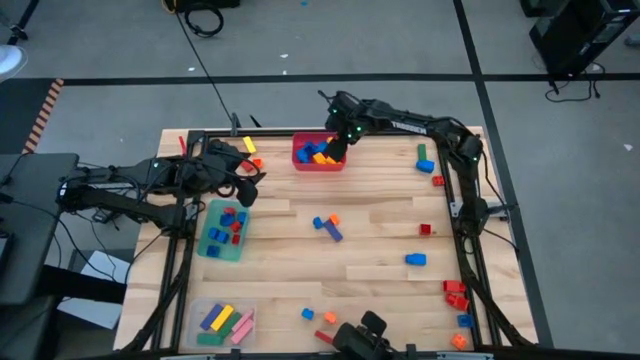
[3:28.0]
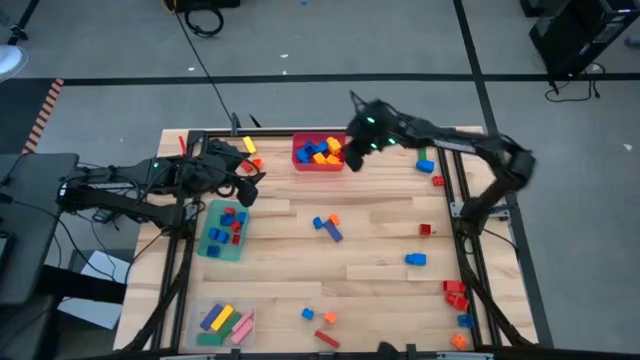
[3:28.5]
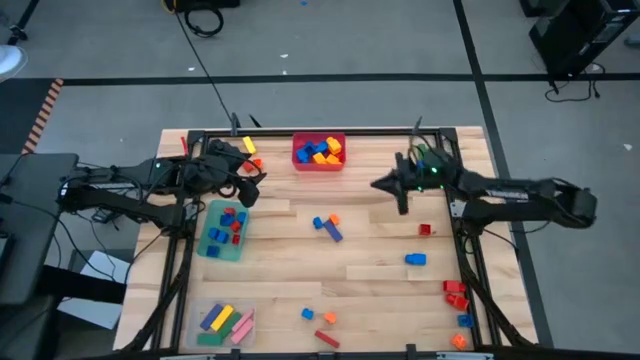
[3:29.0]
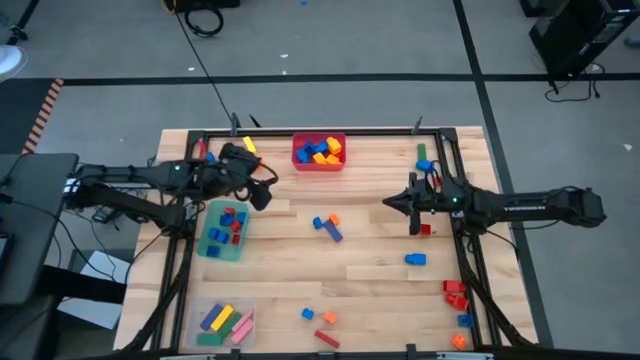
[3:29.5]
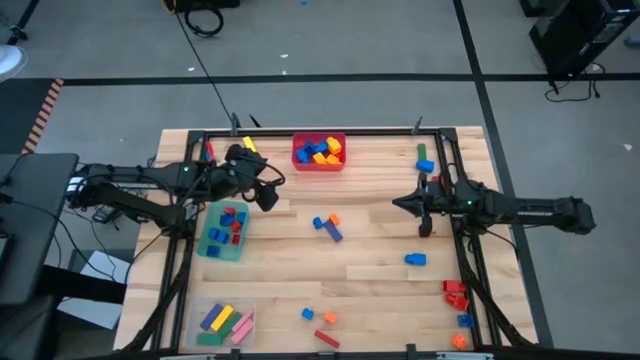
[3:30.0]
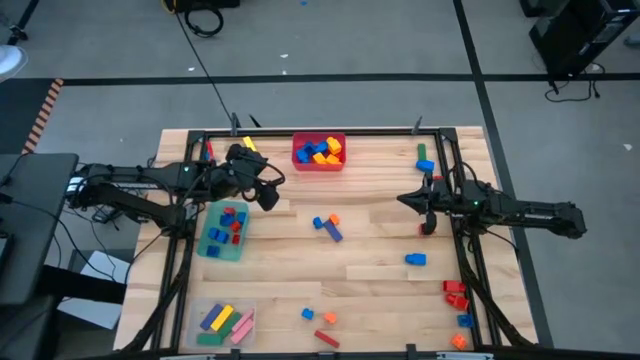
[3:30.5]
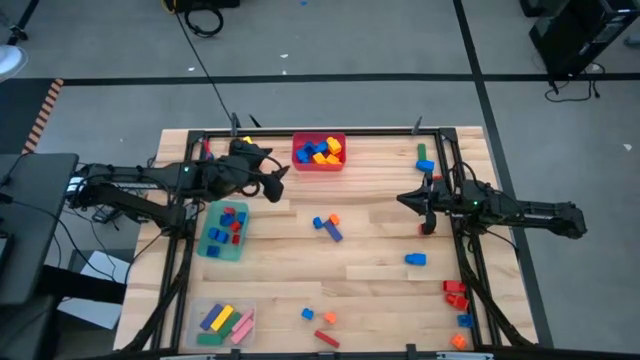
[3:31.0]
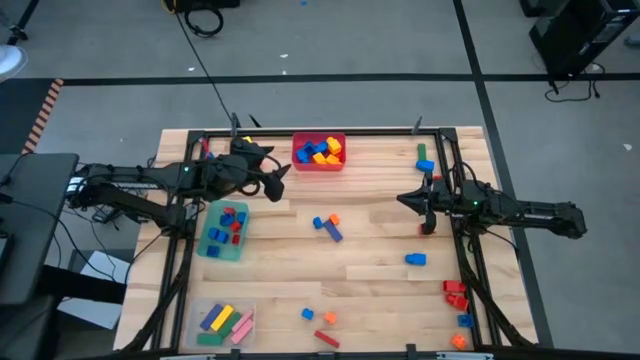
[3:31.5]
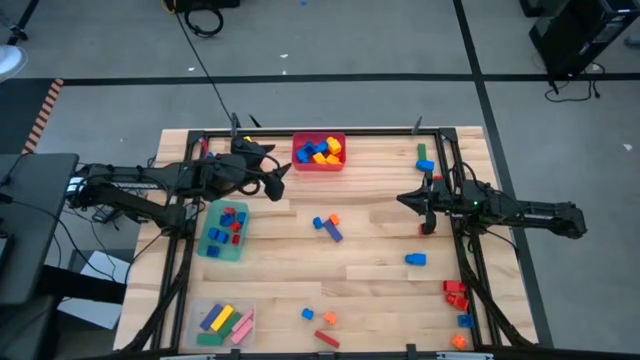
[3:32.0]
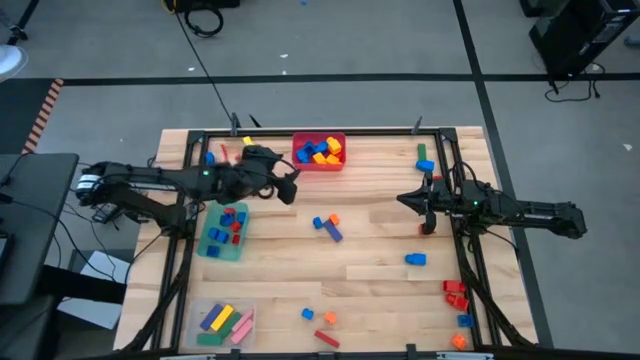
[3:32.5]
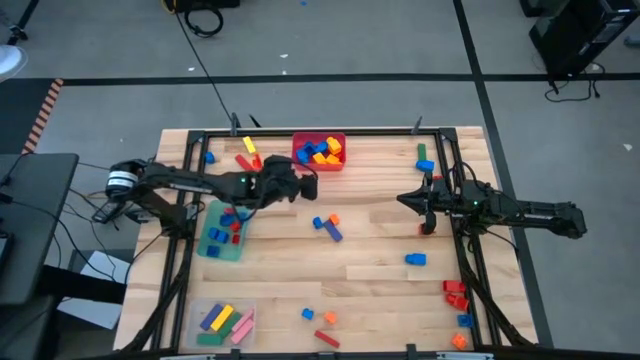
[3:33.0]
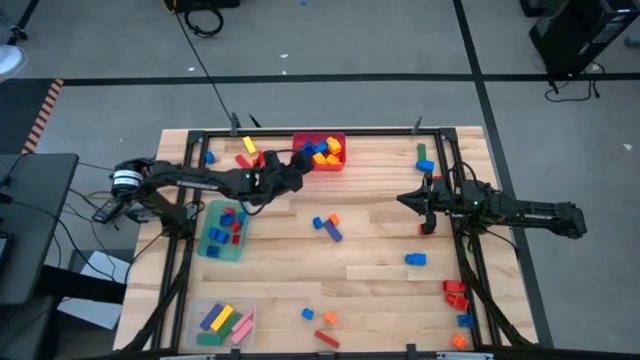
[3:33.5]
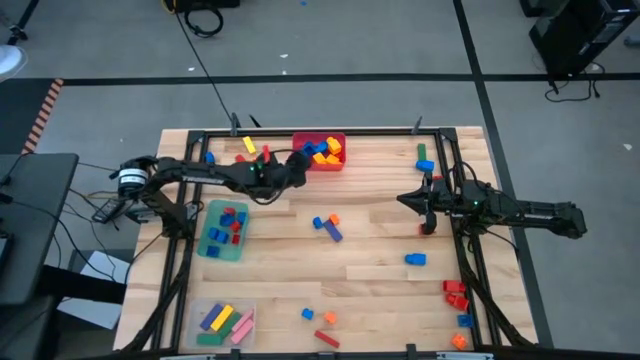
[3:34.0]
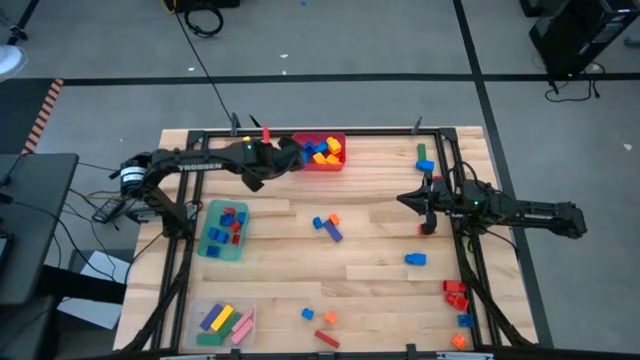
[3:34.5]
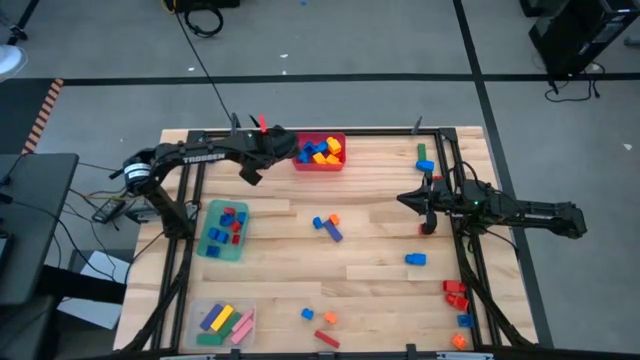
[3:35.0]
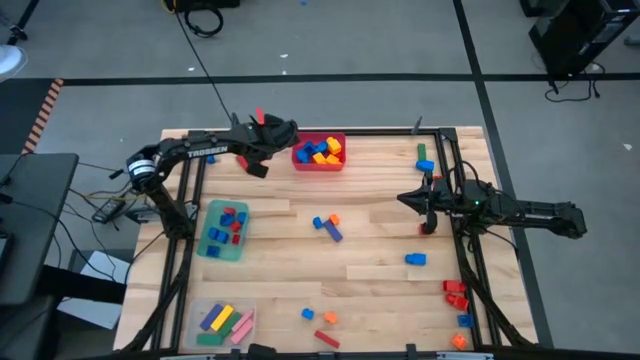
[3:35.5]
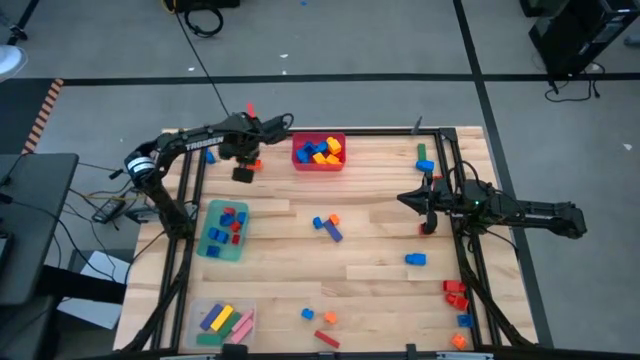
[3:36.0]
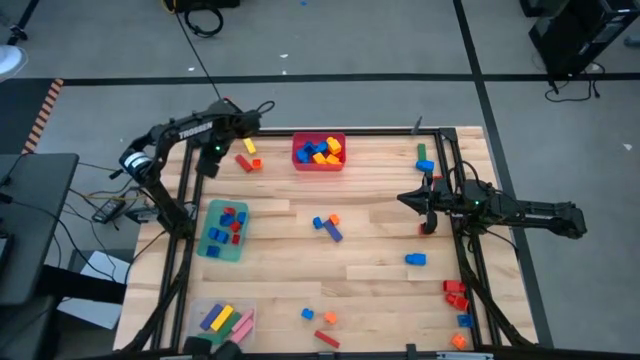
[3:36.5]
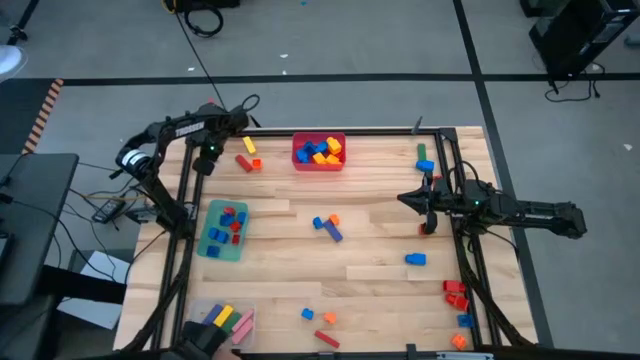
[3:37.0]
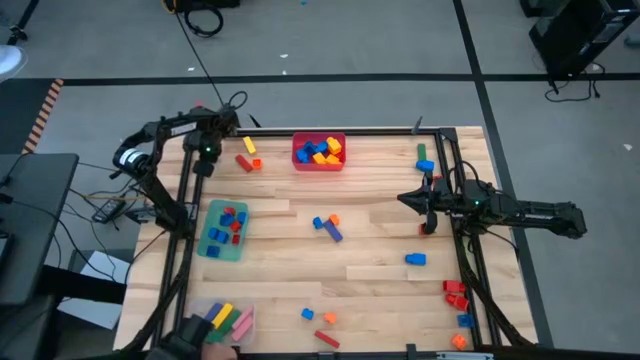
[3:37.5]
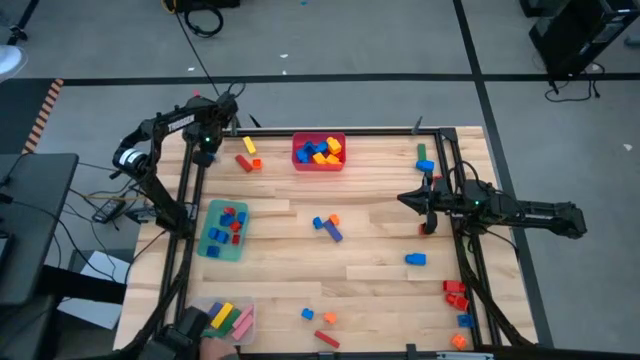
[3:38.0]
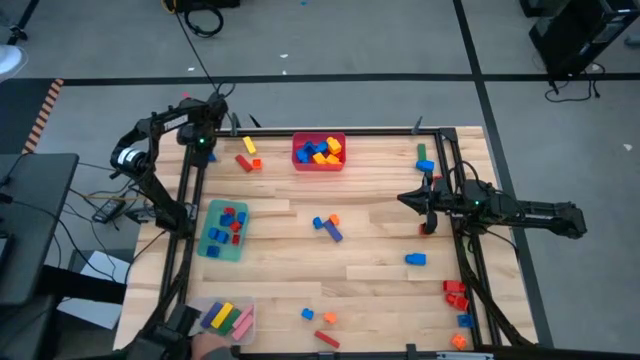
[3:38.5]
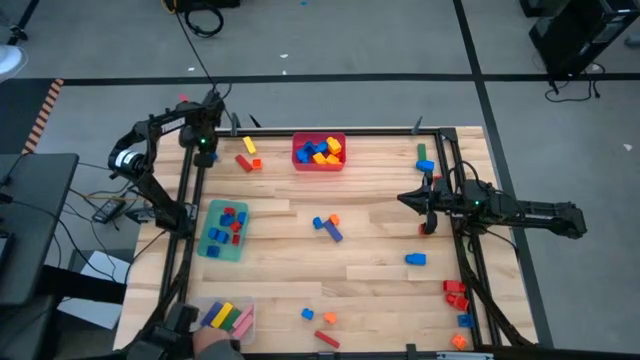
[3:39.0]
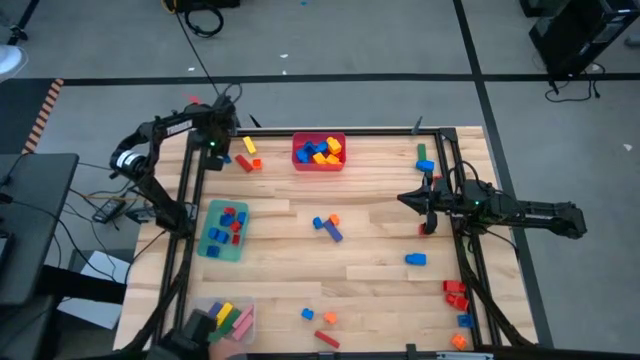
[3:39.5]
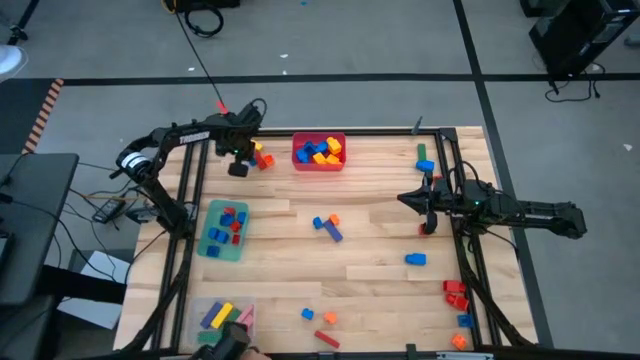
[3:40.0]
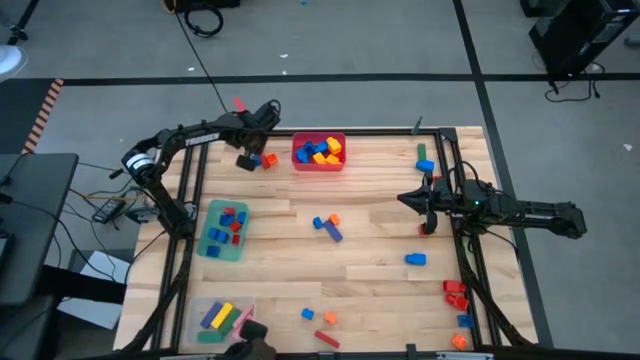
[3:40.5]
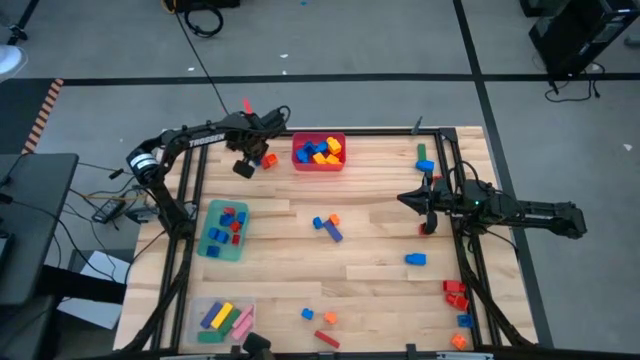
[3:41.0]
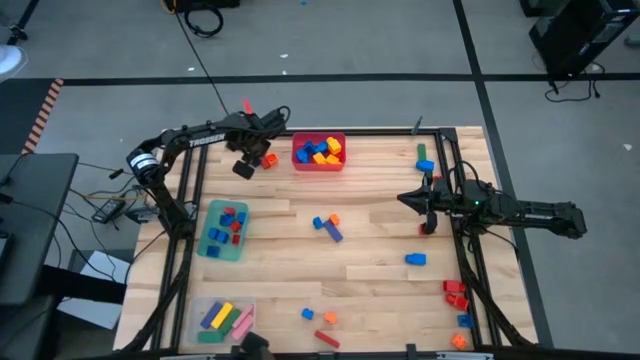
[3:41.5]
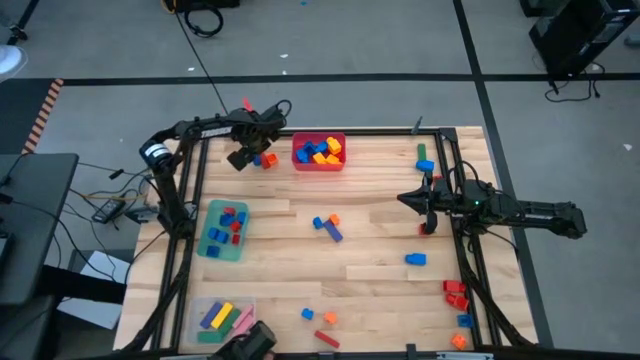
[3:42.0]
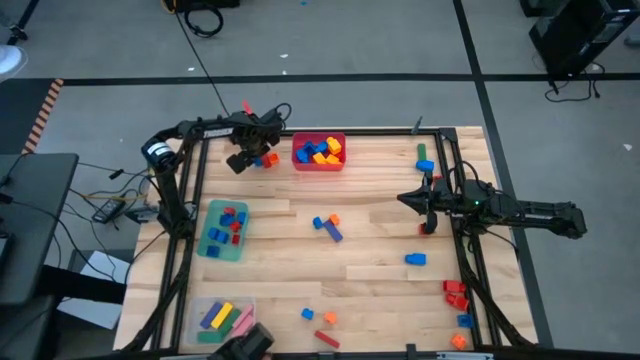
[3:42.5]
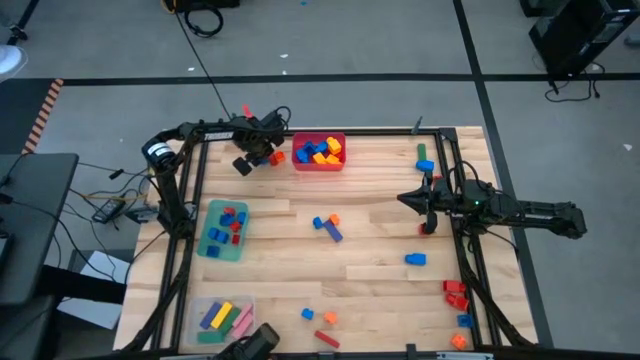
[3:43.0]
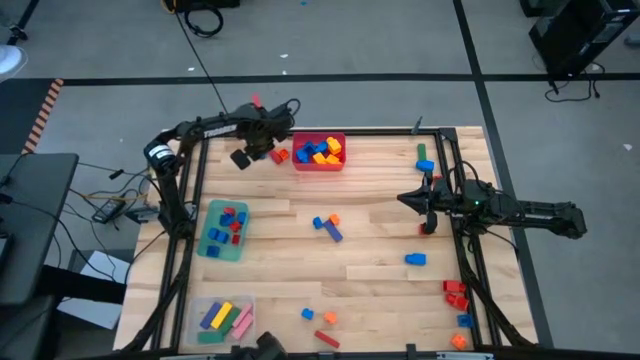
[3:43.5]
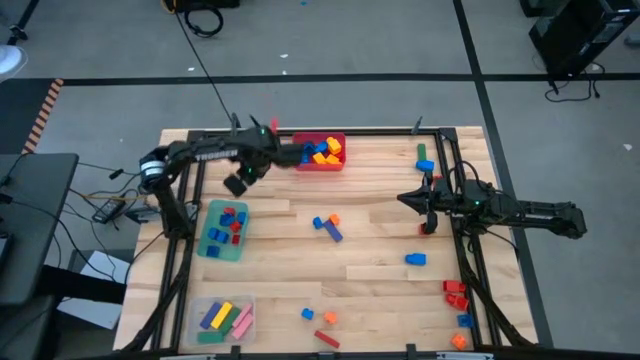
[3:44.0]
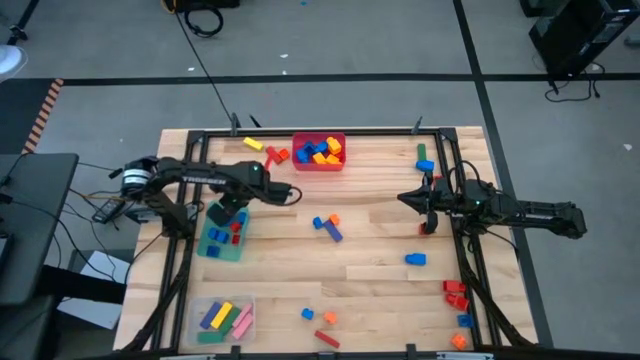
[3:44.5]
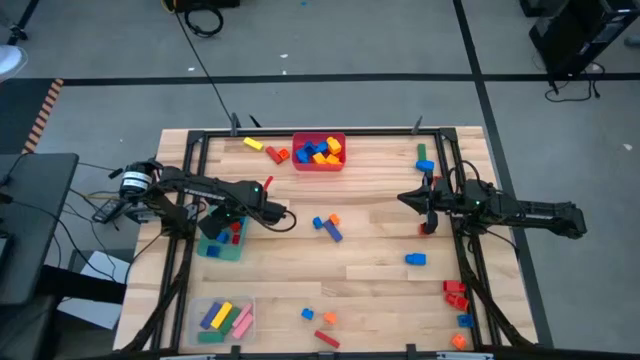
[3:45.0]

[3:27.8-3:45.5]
Task: Sort blocks by size
Put the blue 4 studded building block into the teal bin

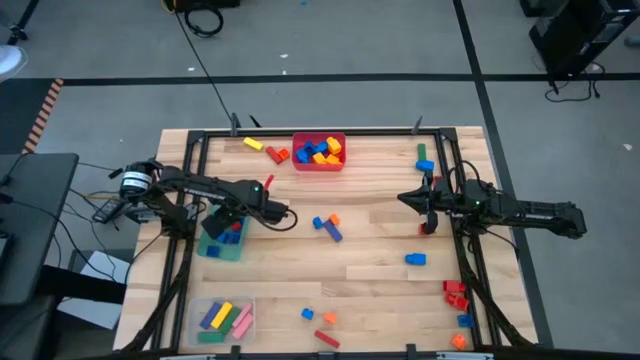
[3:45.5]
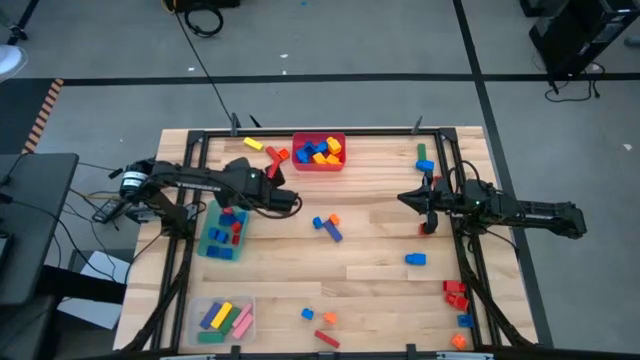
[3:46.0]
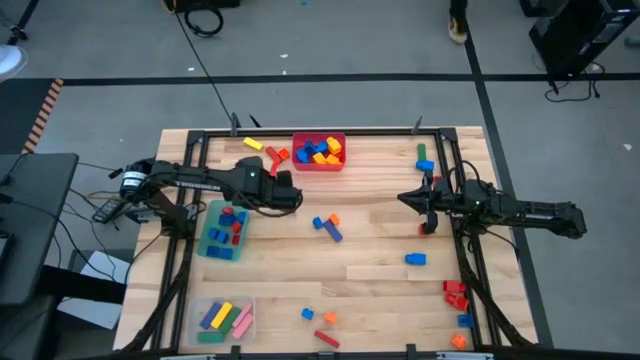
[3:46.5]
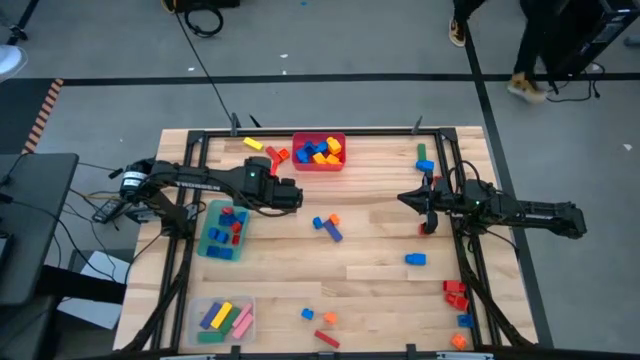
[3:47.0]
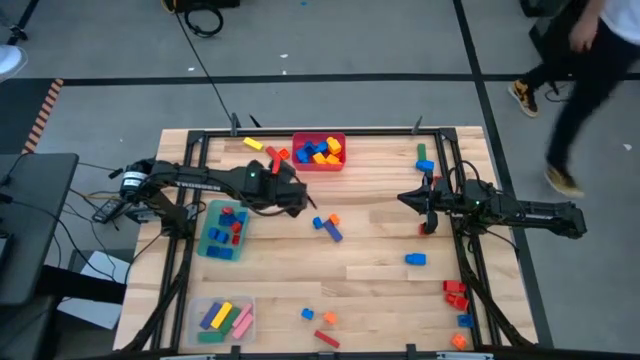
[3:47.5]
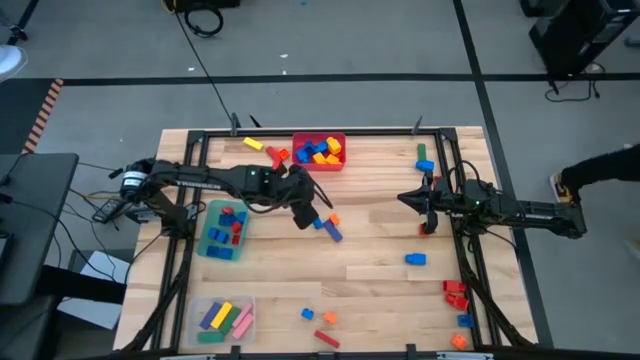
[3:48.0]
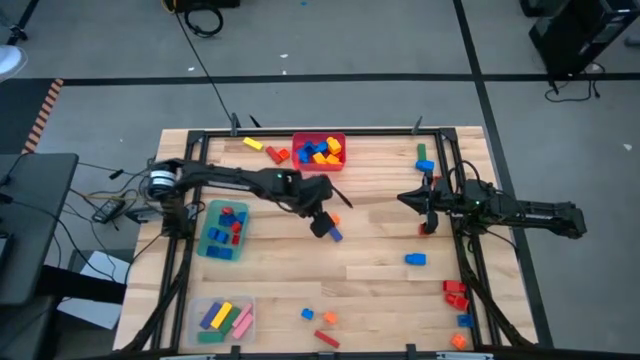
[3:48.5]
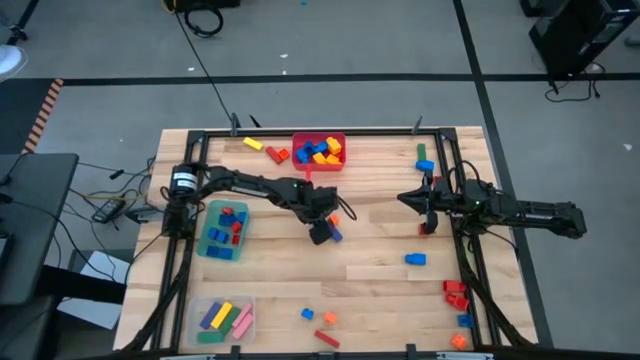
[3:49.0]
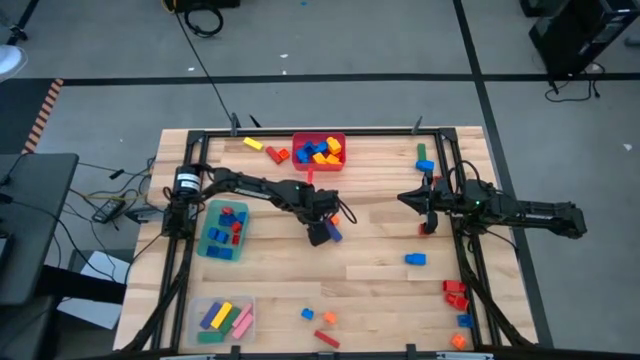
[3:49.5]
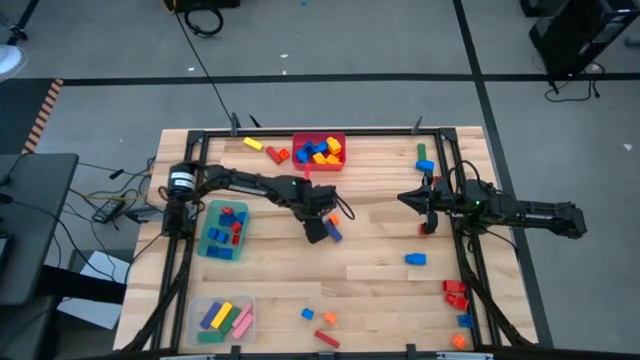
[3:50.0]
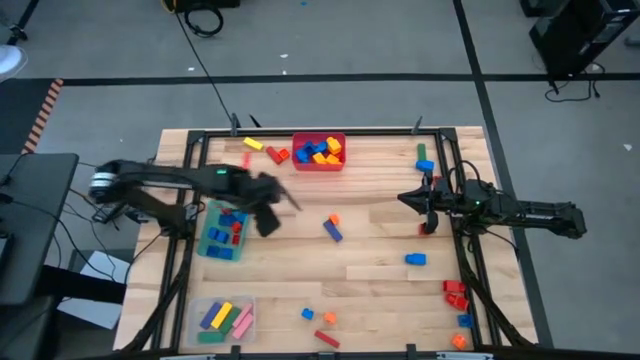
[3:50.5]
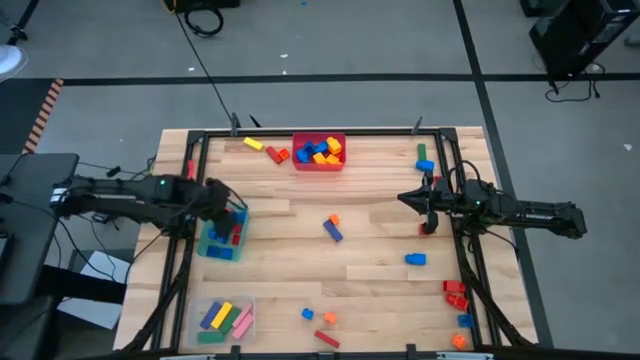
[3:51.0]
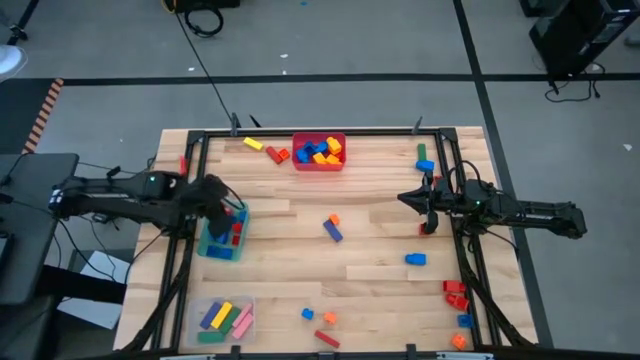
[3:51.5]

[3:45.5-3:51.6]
Put the blue 4 studded building block into the teal bin
